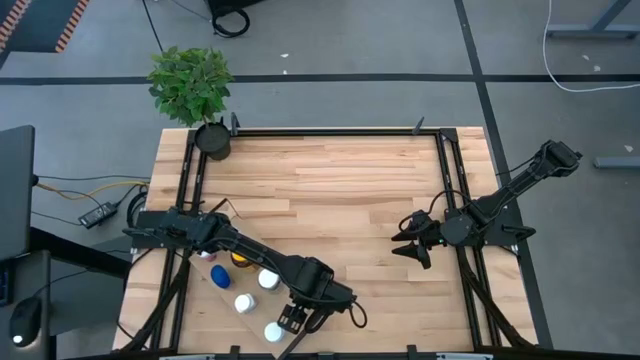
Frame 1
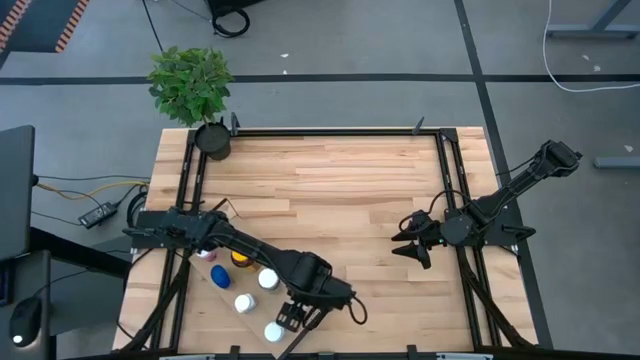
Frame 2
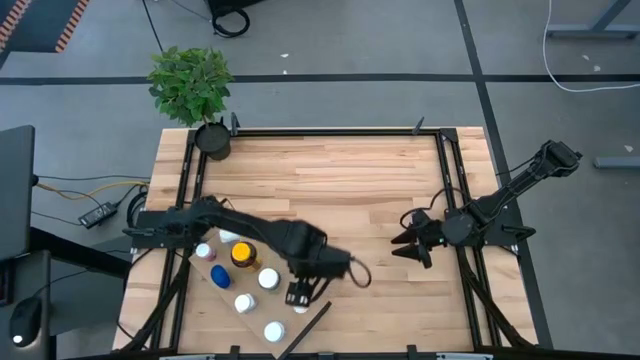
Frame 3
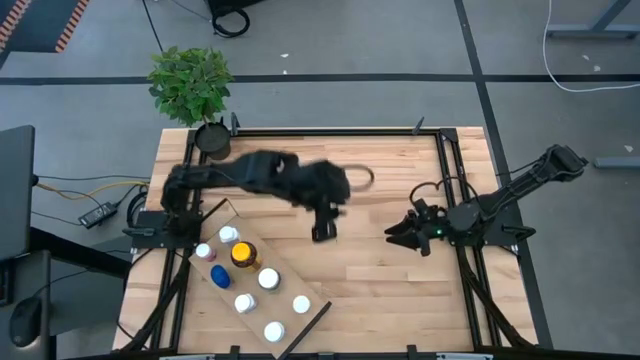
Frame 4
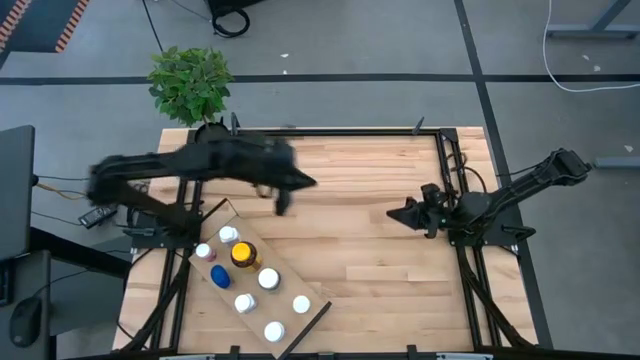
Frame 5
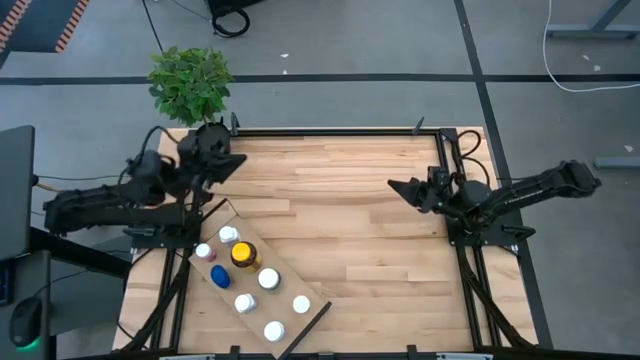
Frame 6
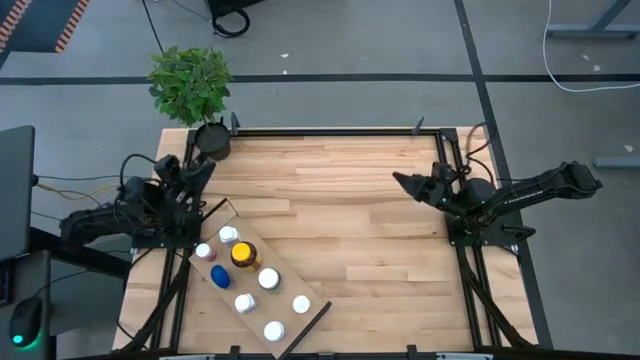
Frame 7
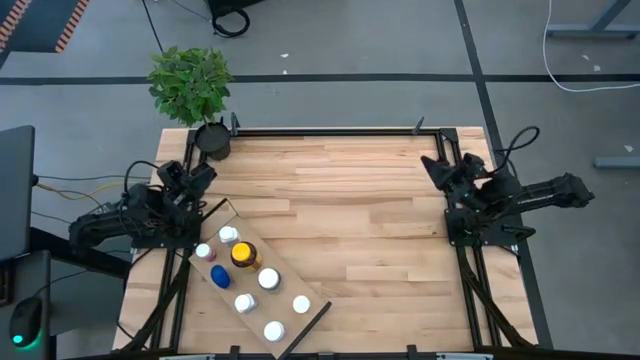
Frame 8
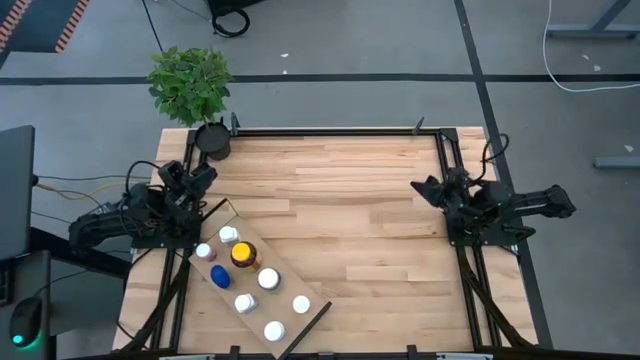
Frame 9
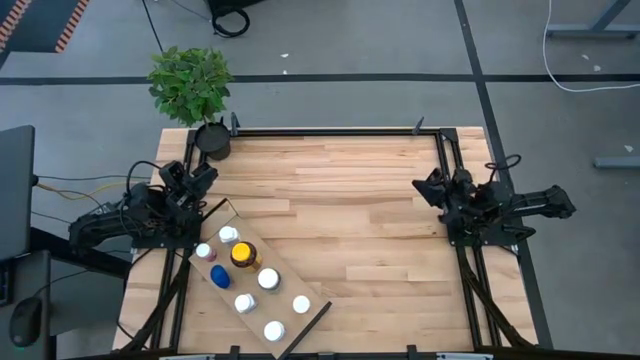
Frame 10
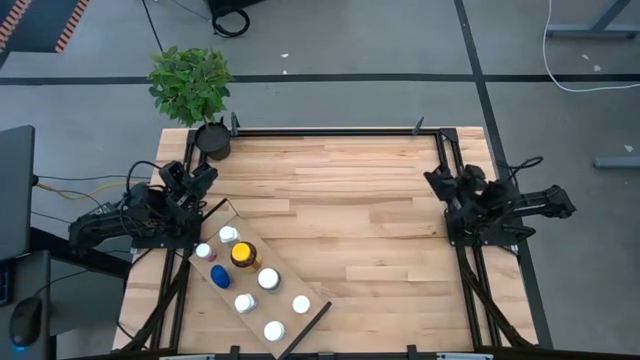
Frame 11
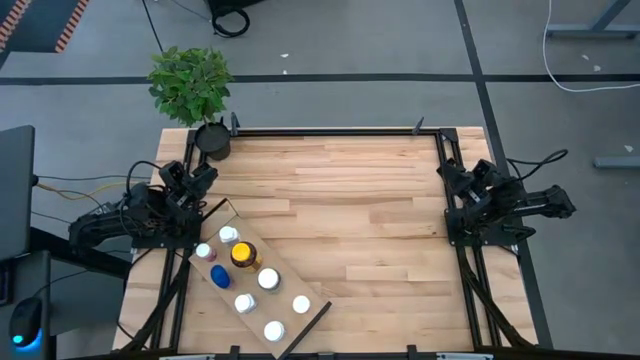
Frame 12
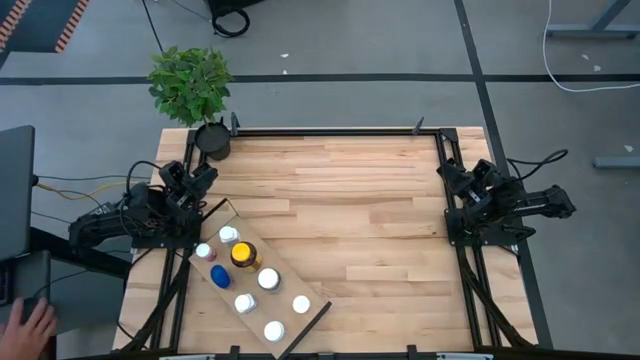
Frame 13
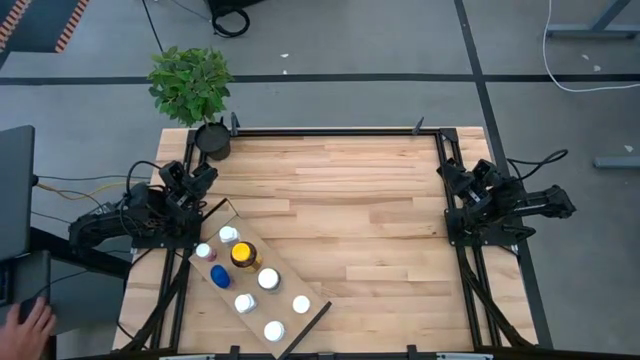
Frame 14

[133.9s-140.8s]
Task: Pick and place medicine bottles onto shelf by color
Return to Home Position

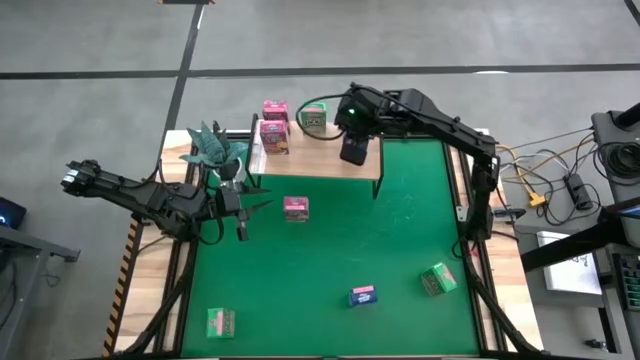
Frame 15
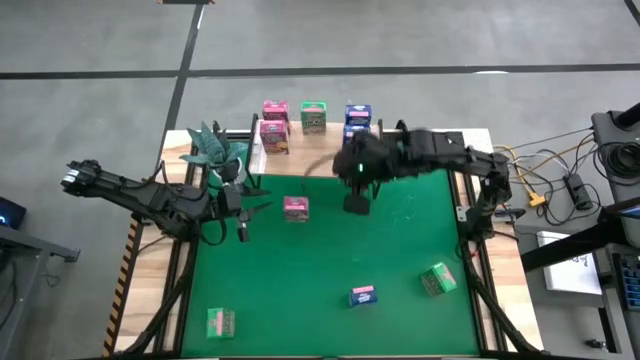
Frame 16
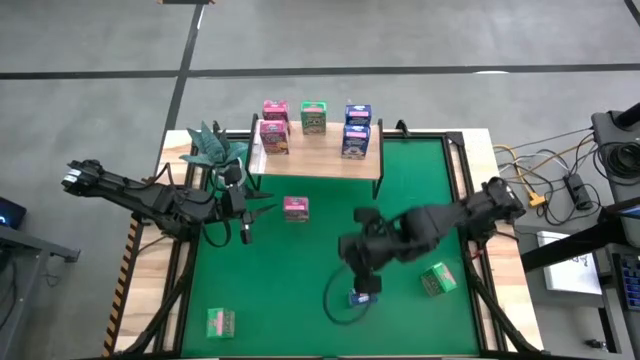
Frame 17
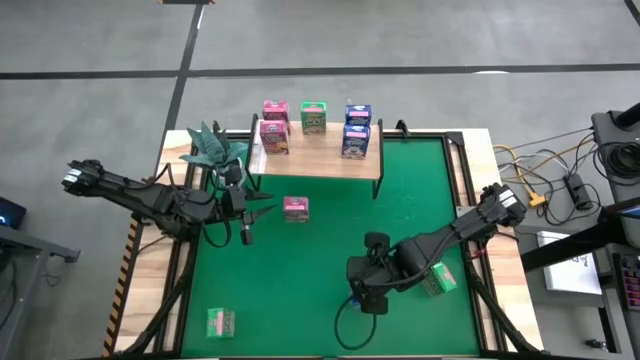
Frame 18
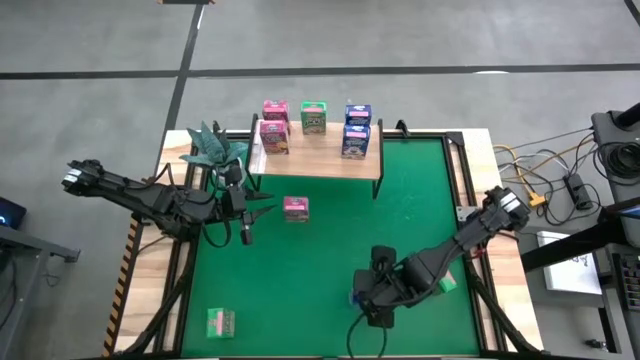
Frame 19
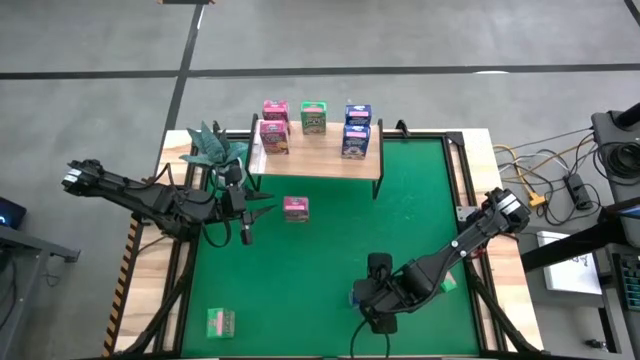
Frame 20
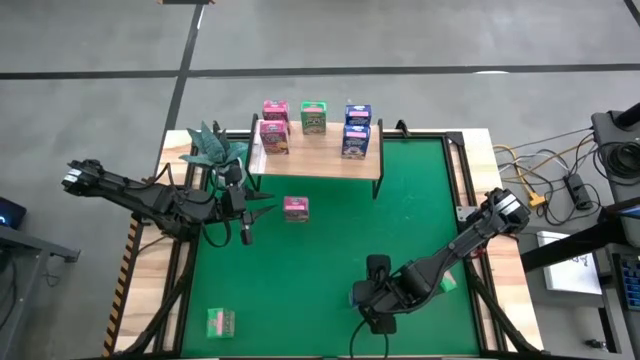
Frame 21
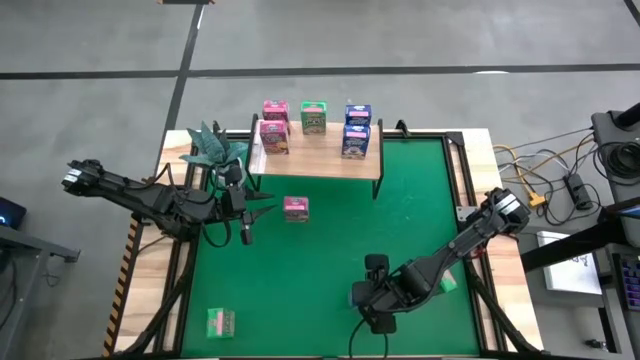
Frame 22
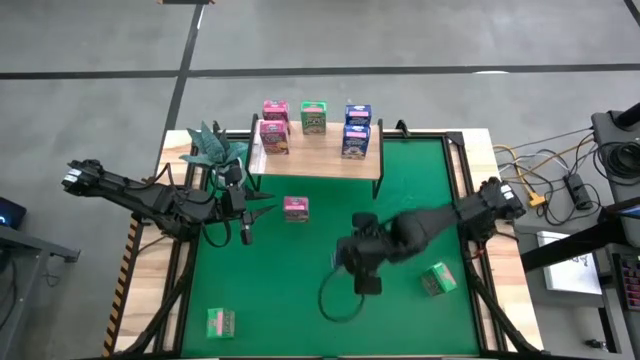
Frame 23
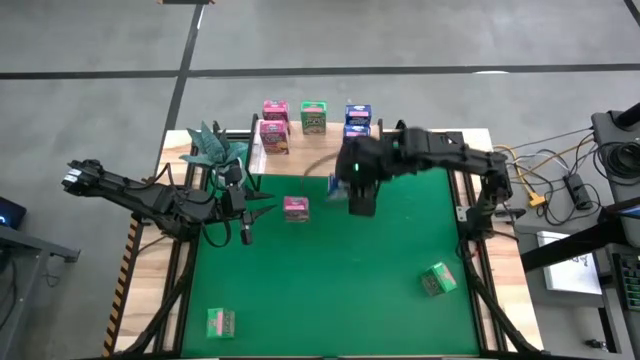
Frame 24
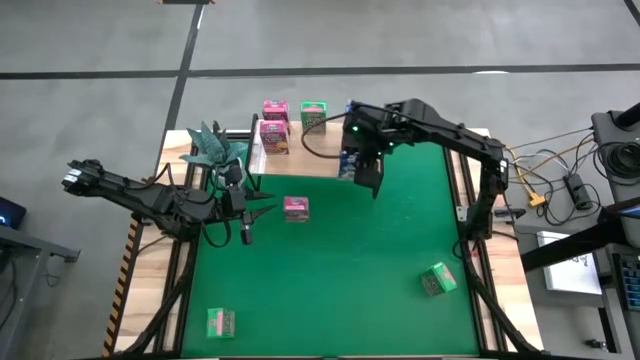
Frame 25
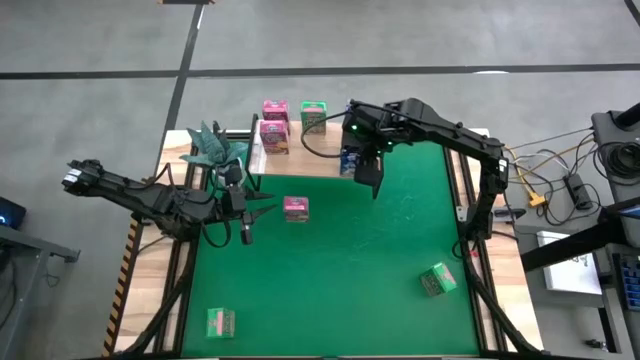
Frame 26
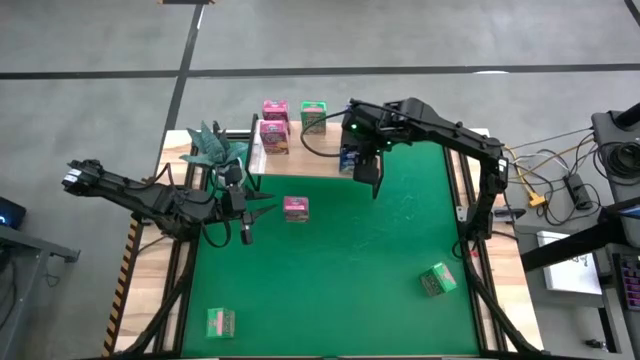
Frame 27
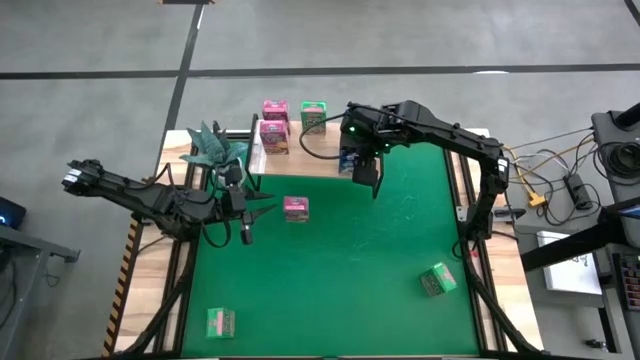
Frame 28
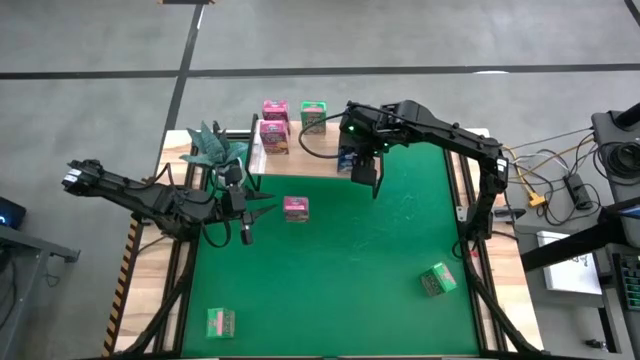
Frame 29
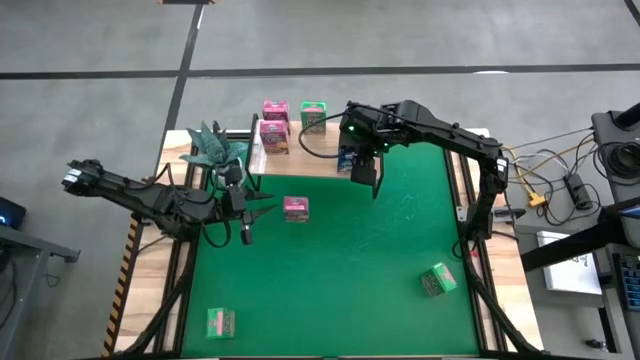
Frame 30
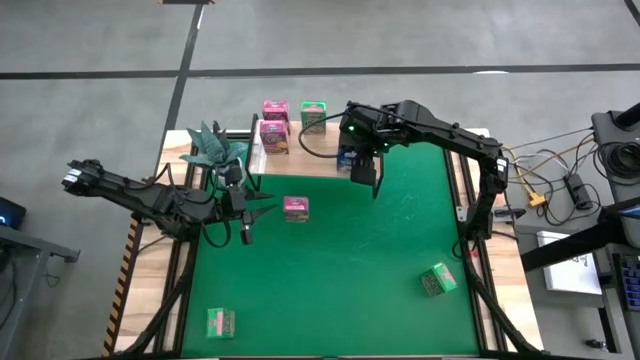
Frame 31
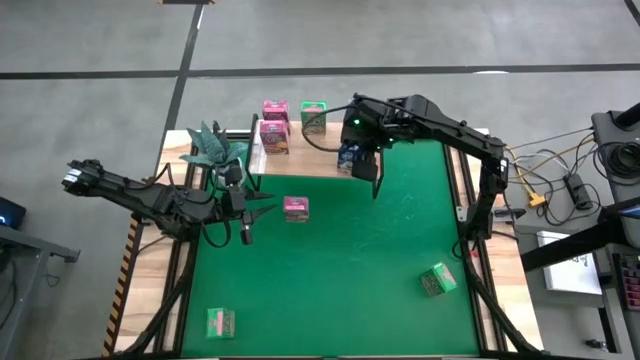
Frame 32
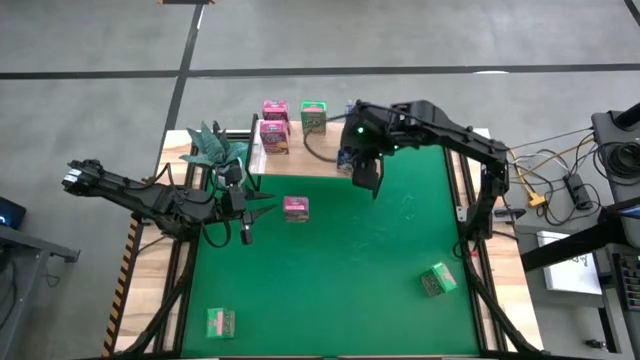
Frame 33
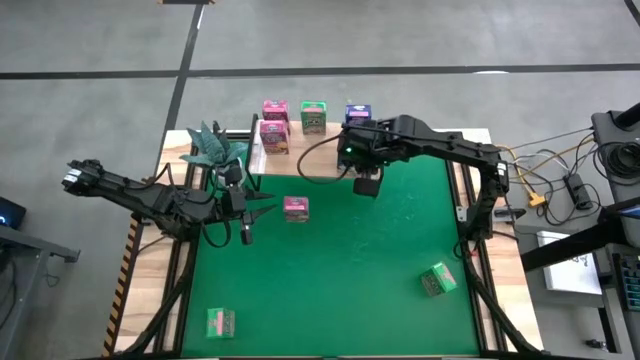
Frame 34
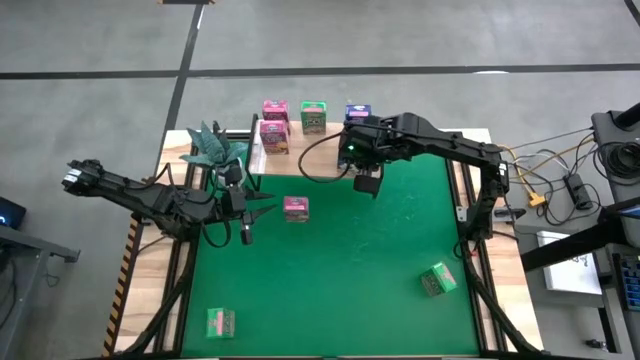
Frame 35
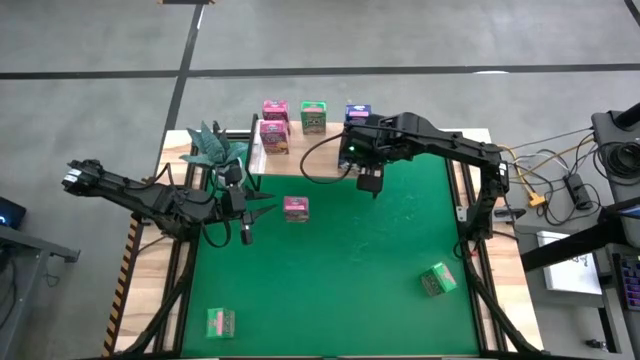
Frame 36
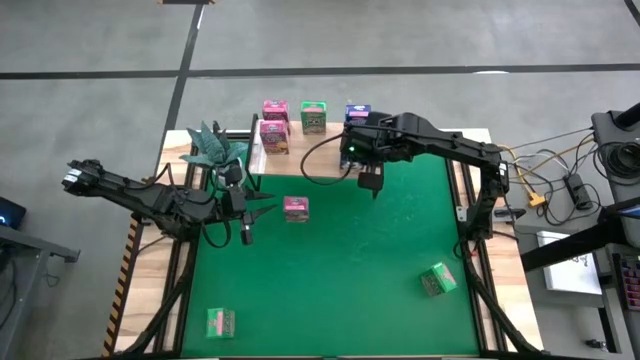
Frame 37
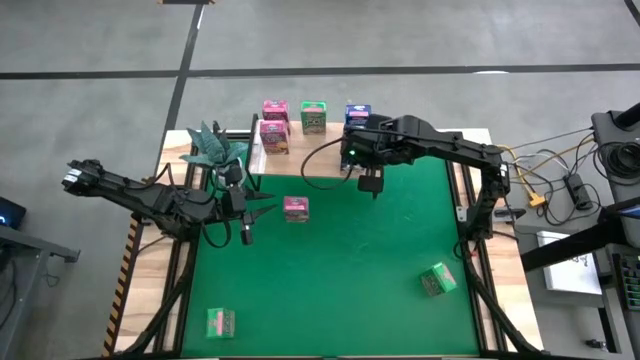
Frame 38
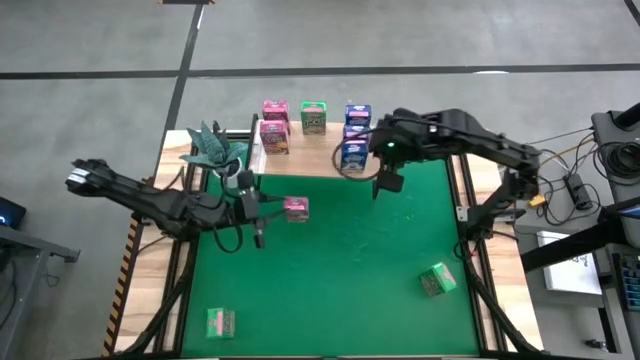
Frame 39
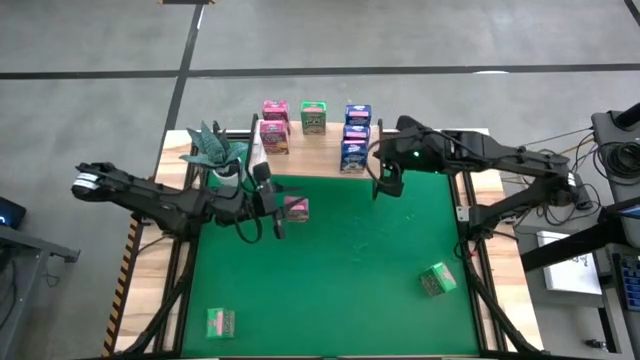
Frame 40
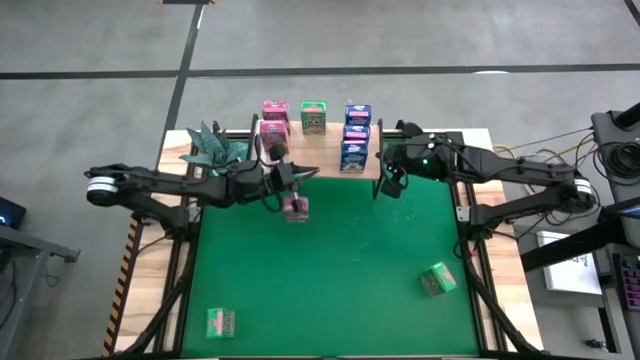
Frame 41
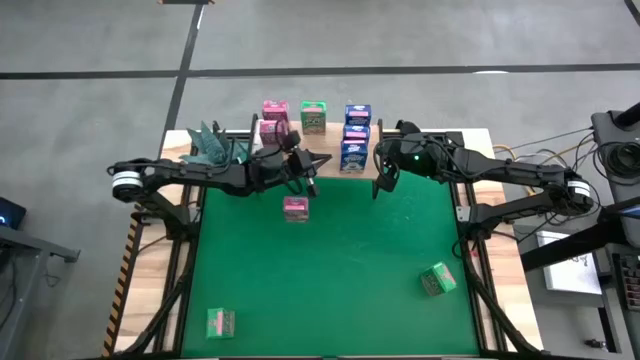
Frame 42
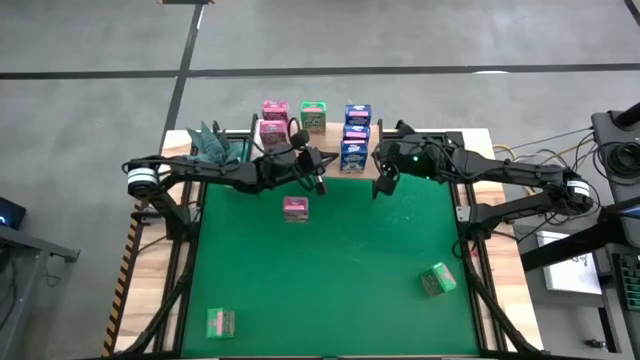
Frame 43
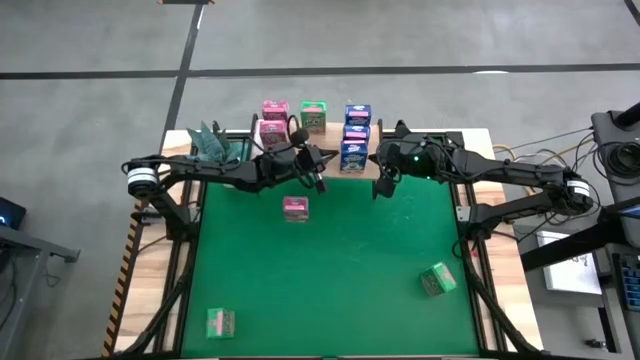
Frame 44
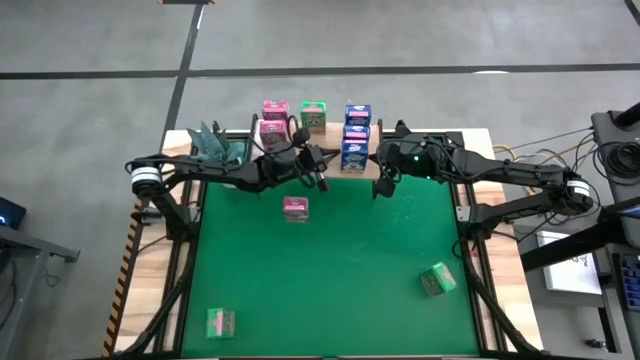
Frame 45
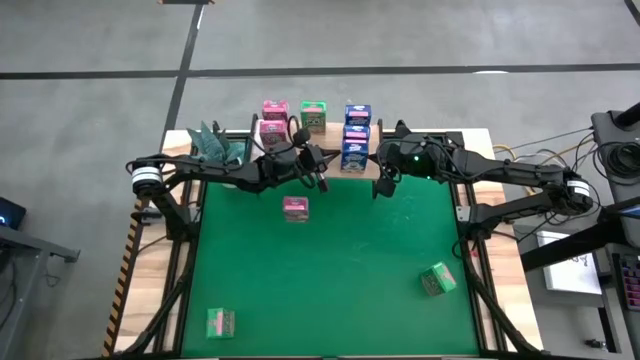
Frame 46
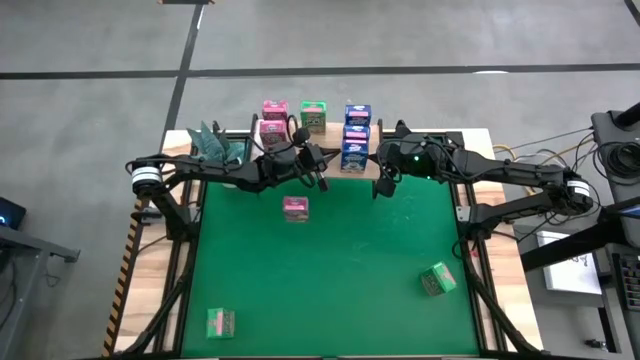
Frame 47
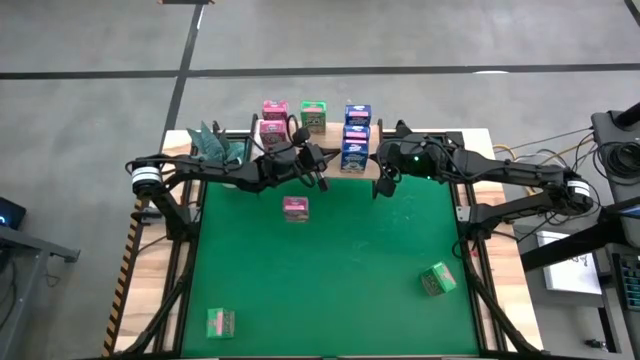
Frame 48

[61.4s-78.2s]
Task: Stack cereal on shelf
Put the blue cereal box on the shelf aligned with the other blue cereal boxes
